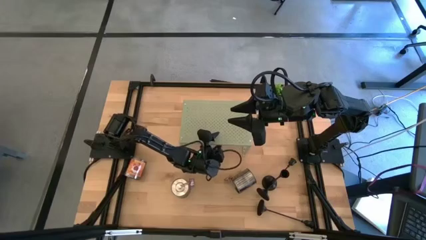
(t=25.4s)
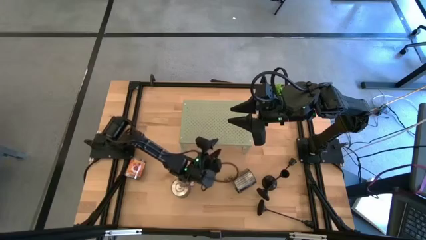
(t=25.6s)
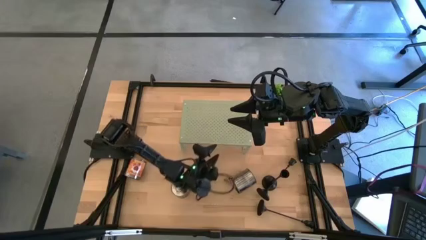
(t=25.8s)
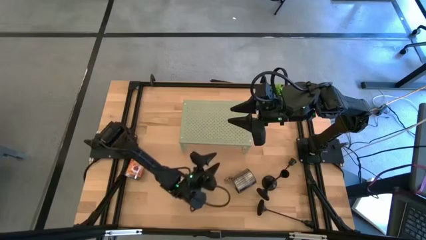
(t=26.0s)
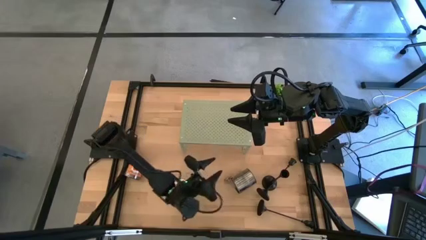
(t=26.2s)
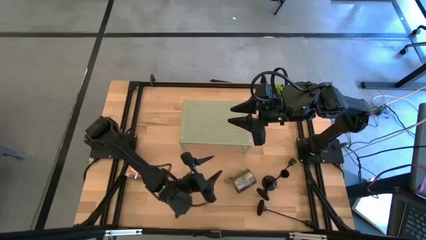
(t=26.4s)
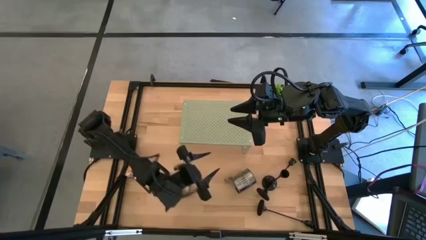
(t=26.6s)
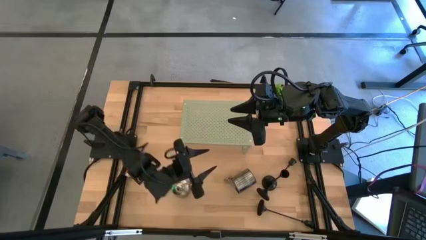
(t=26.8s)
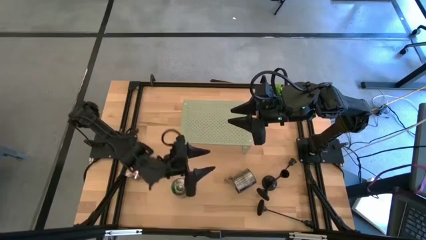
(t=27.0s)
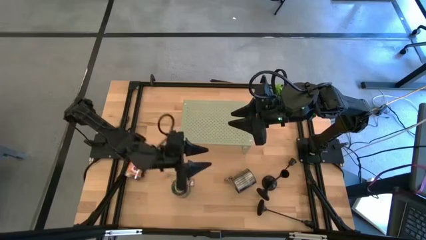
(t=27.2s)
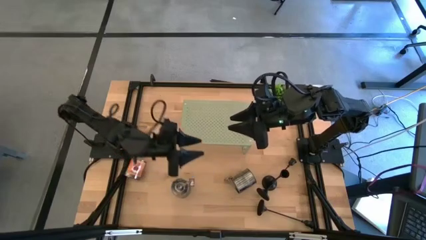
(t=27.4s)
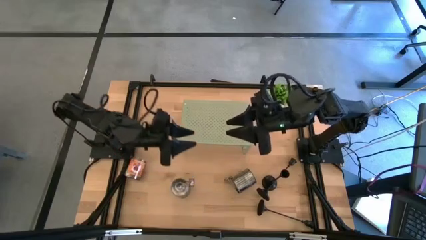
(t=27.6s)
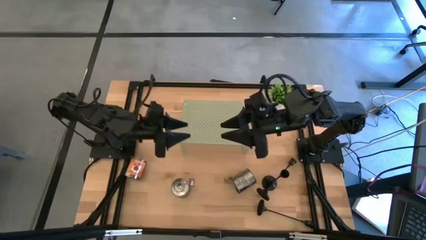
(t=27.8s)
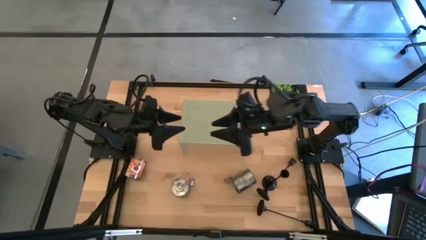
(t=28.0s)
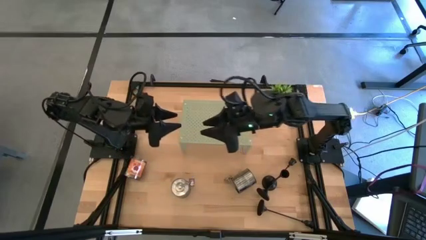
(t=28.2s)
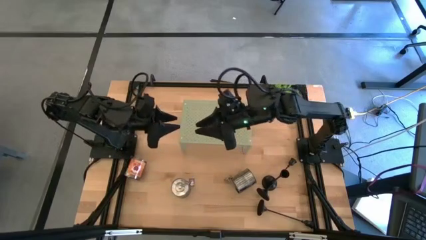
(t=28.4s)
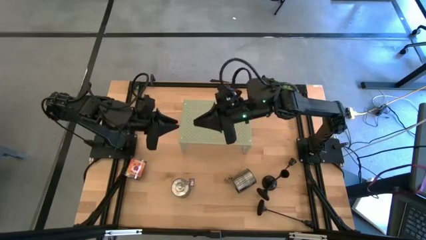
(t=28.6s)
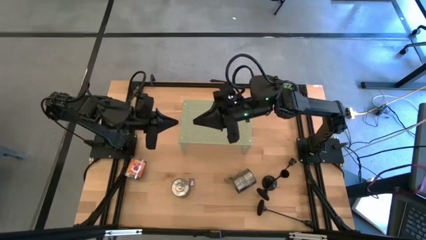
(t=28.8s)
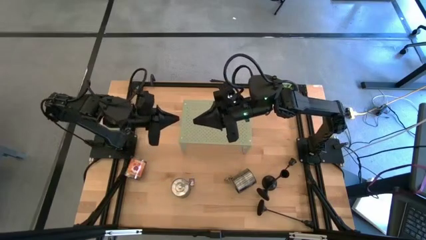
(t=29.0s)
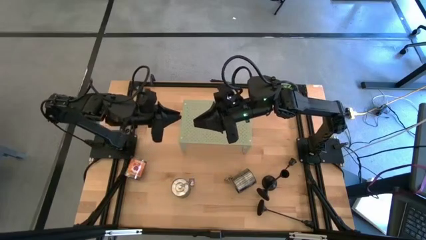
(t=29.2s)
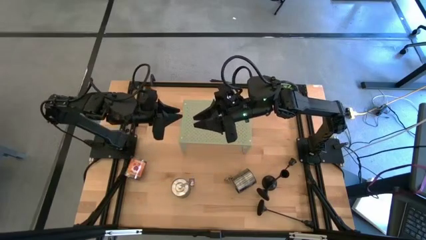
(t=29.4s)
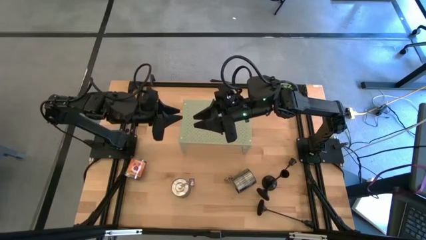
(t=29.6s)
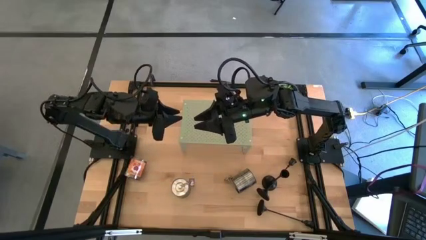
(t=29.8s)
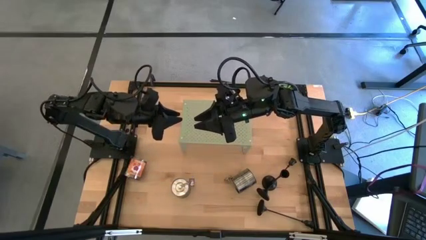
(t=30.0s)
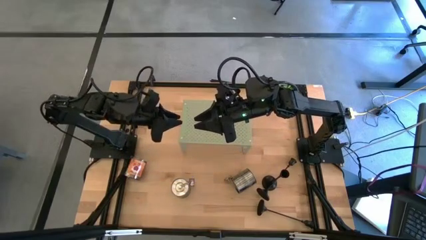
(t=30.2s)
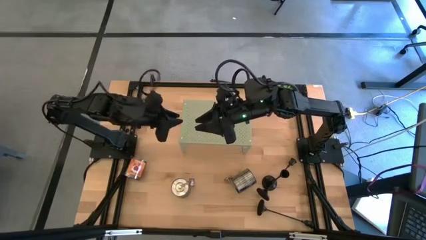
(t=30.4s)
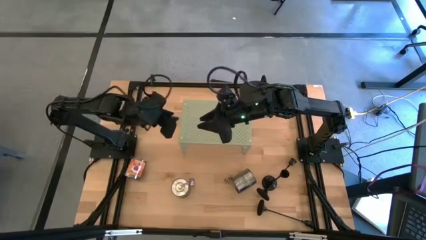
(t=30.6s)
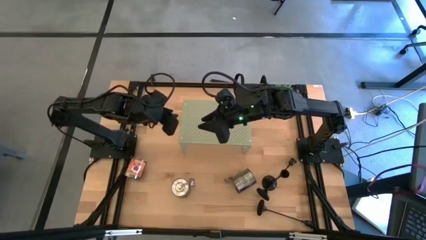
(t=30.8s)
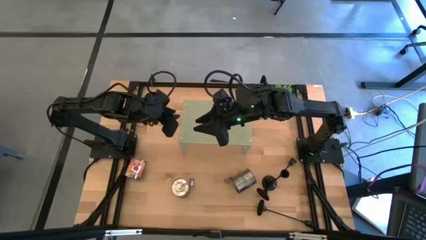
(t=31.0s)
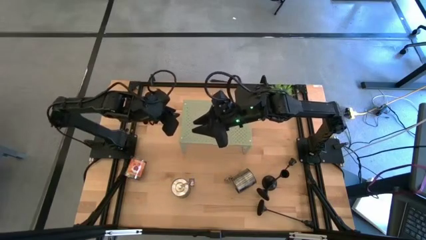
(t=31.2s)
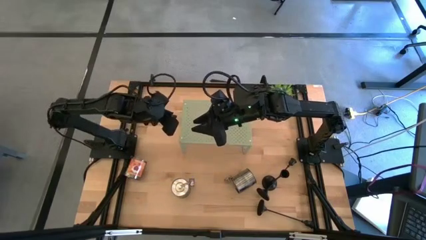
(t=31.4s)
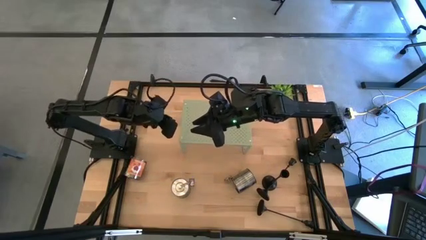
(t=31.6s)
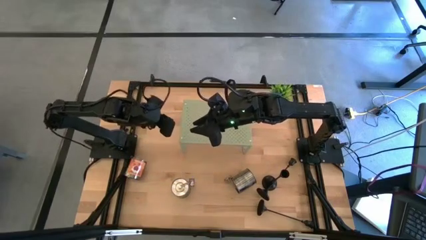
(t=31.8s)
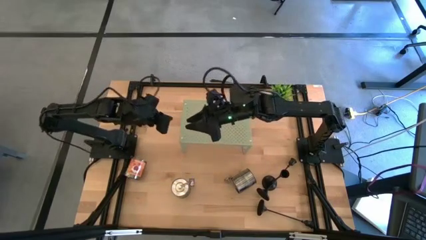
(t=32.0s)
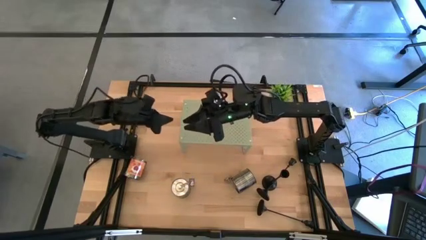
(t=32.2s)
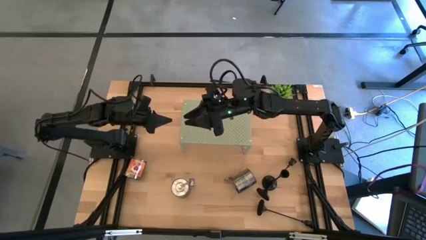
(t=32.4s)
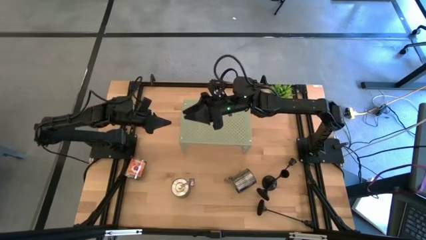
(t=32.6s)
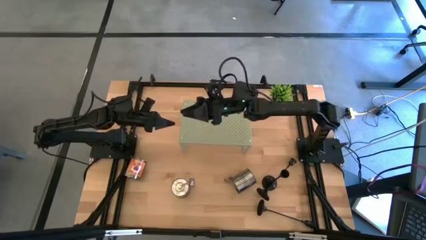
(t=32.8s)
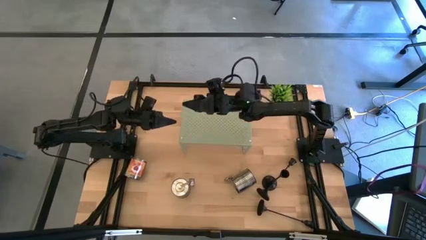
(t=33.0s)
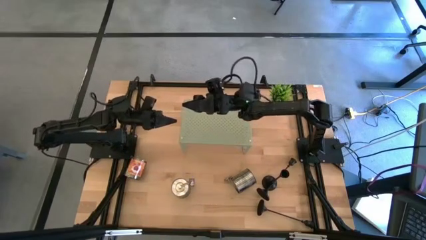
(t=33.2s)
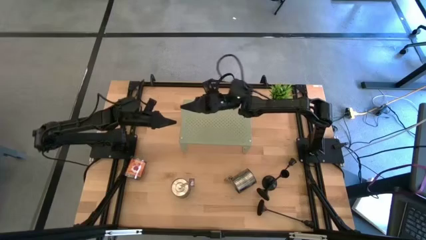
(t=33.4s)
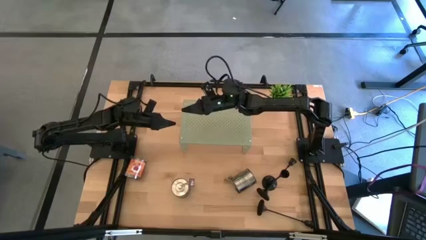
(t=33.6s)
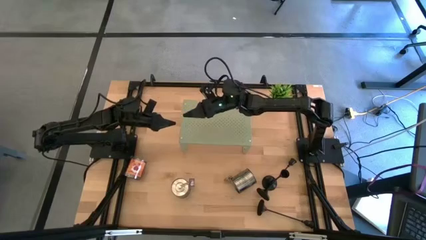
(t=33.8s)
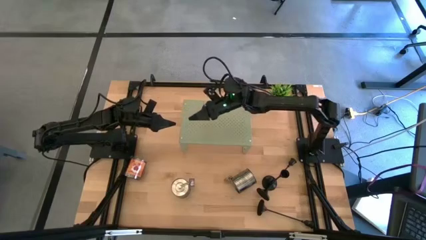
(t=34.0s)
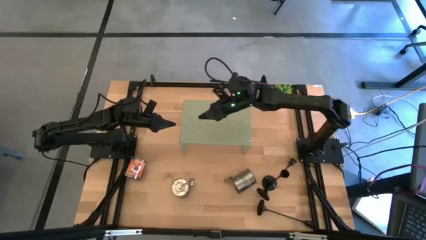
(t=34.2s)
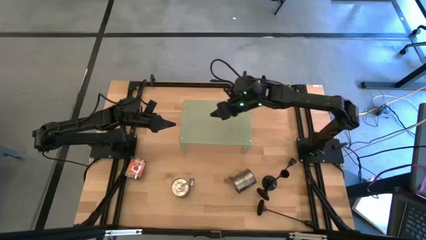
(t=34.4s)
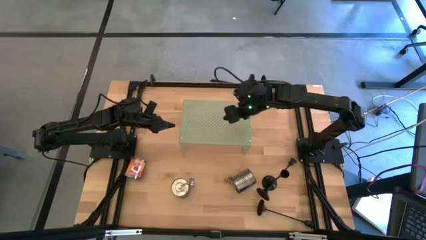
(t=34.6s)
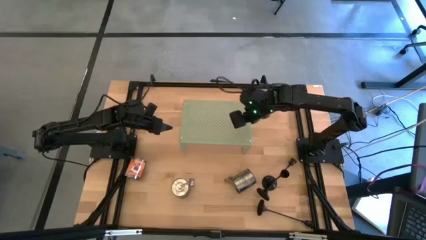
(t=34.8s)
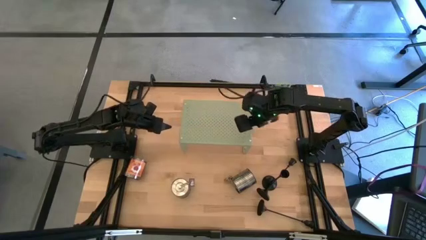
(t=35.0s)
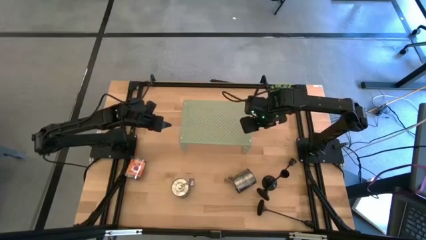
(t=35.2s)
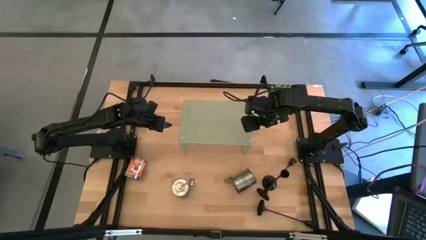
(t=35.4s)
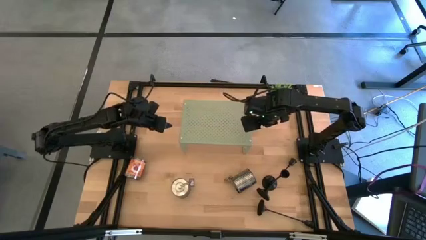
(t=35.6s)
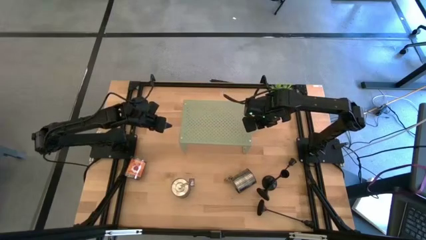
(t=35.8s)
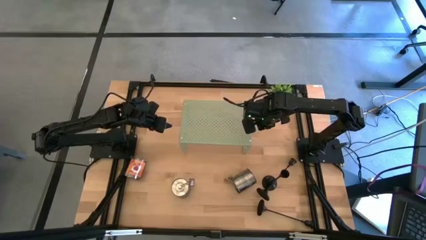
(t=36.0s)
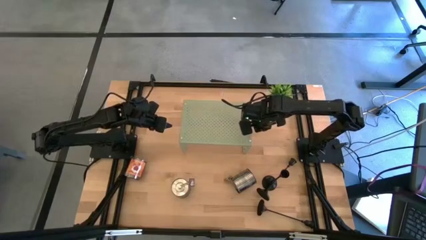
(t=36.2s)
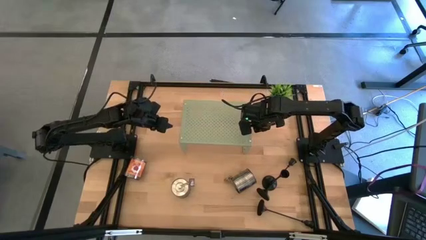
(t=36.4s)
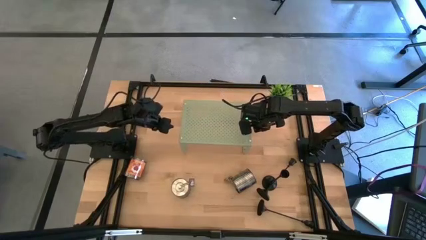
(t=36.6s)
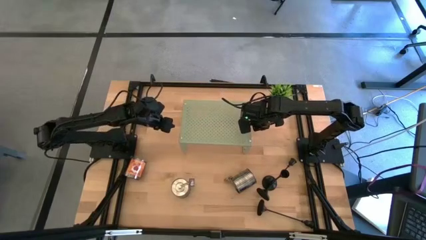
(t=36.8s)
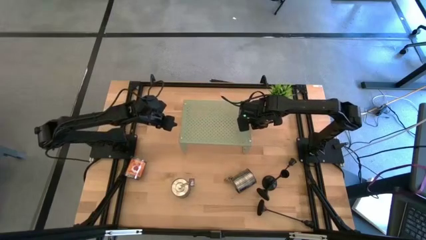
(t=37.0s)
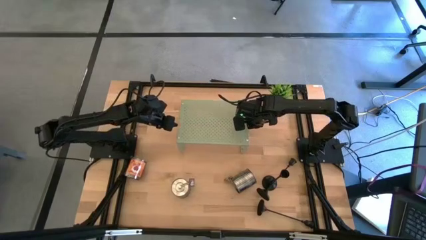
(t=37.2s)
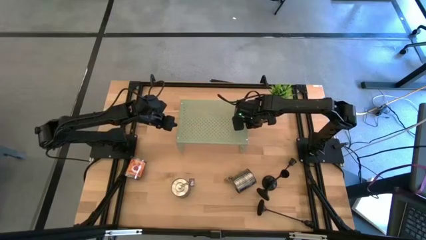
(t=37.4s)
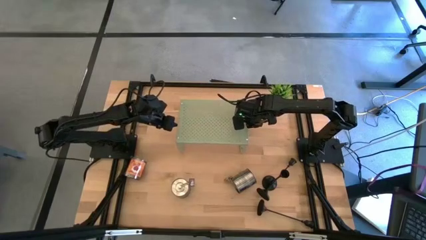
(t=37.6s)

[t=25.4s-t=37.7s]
Task: Pick & Place candle stick holders
Adjust the shelf on the table
